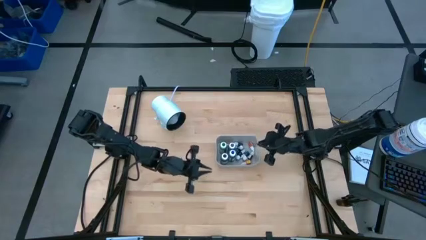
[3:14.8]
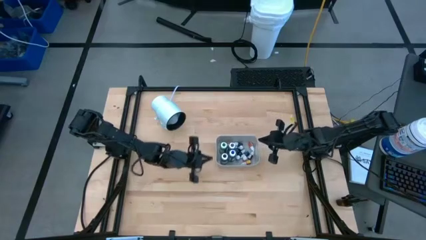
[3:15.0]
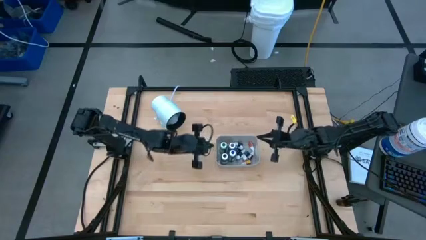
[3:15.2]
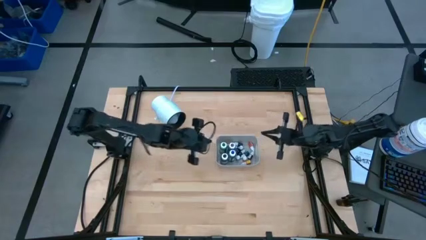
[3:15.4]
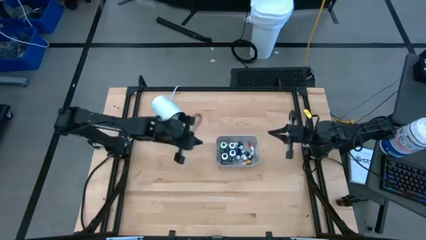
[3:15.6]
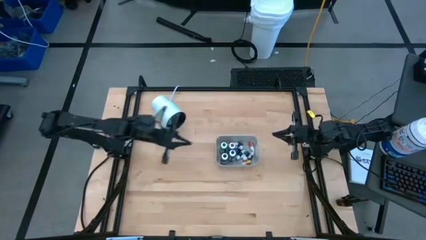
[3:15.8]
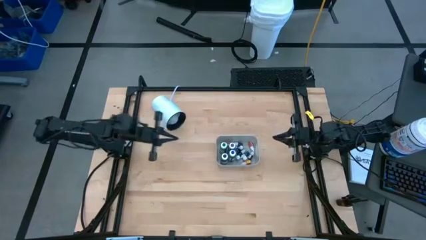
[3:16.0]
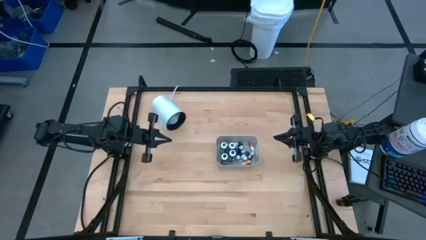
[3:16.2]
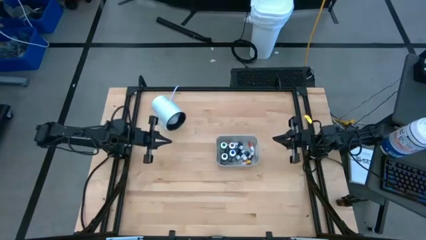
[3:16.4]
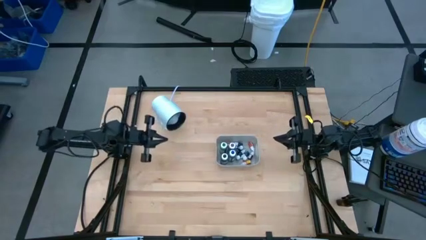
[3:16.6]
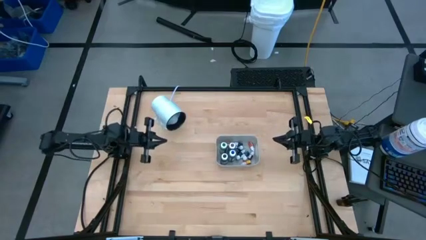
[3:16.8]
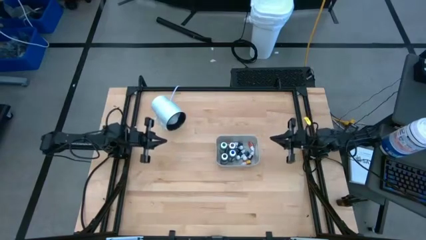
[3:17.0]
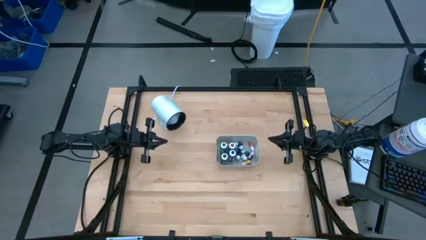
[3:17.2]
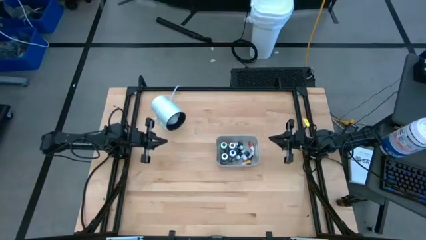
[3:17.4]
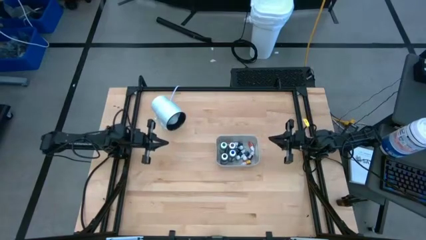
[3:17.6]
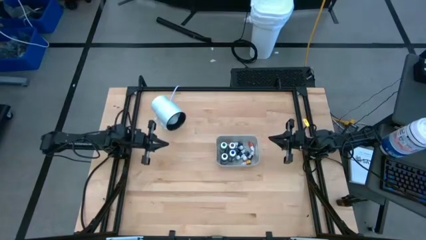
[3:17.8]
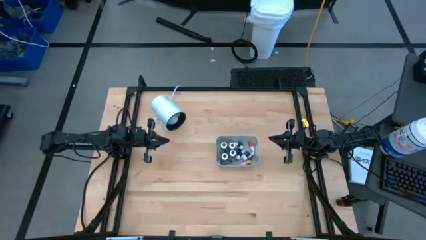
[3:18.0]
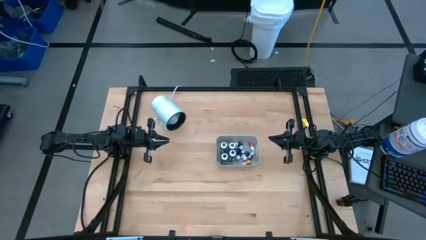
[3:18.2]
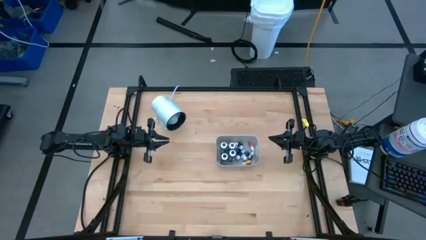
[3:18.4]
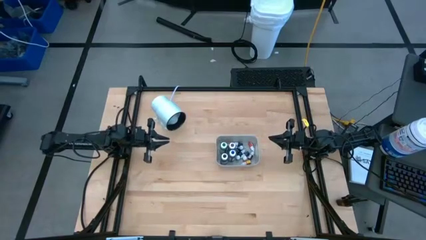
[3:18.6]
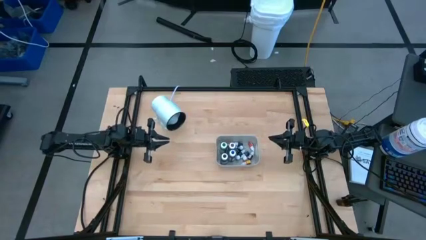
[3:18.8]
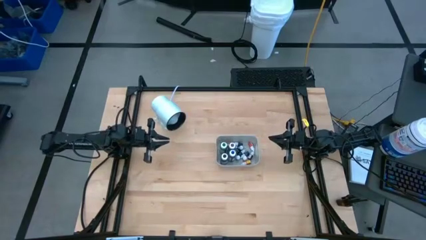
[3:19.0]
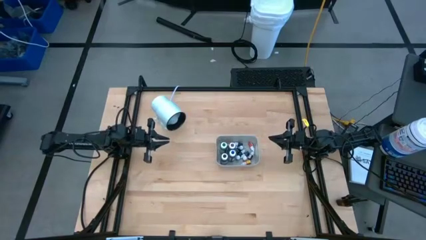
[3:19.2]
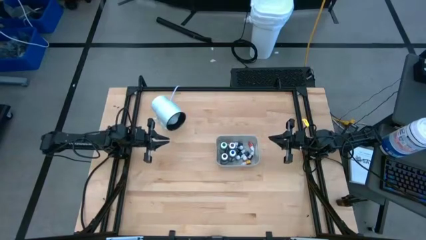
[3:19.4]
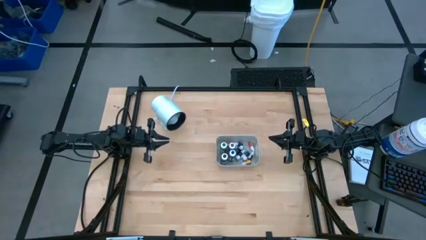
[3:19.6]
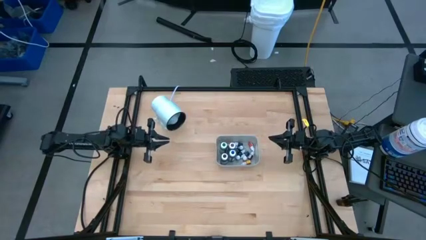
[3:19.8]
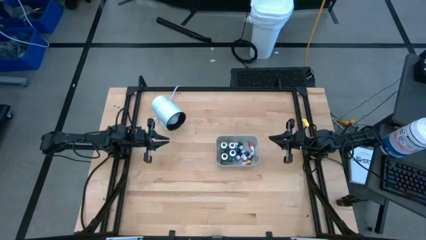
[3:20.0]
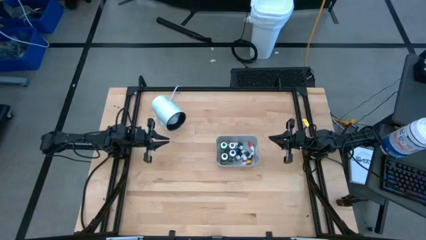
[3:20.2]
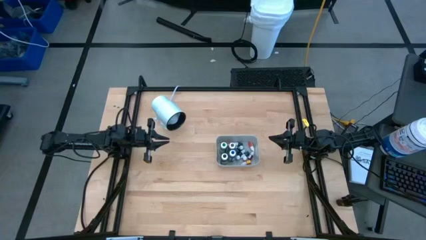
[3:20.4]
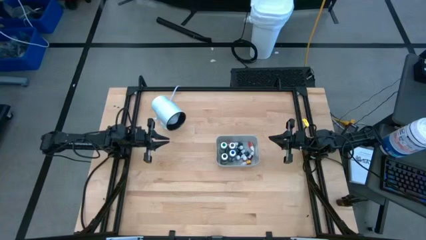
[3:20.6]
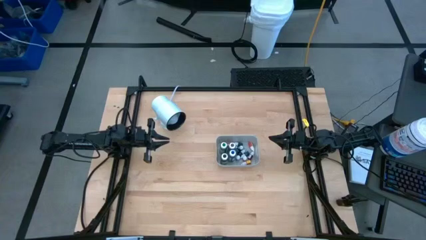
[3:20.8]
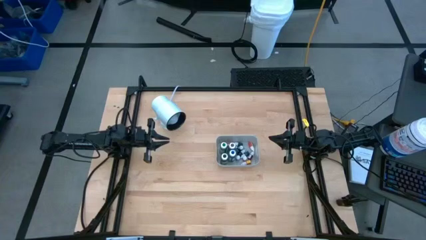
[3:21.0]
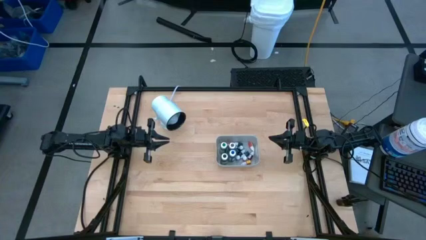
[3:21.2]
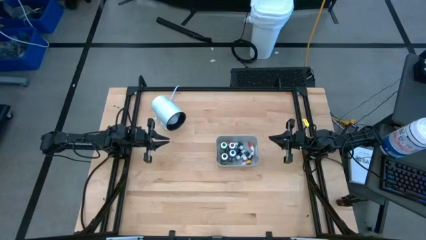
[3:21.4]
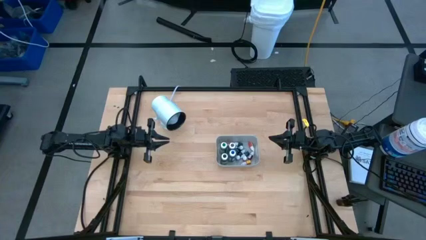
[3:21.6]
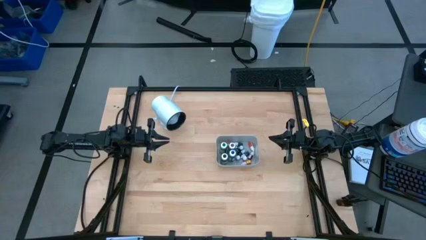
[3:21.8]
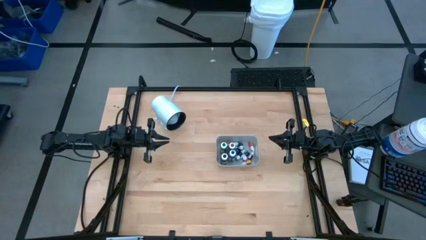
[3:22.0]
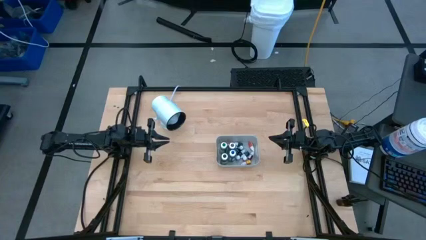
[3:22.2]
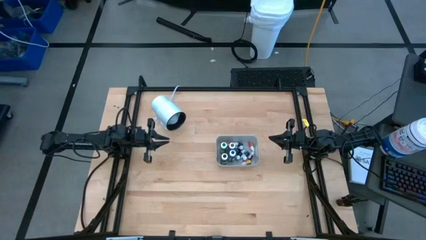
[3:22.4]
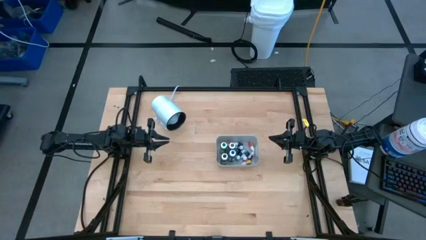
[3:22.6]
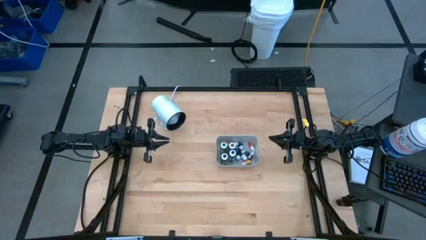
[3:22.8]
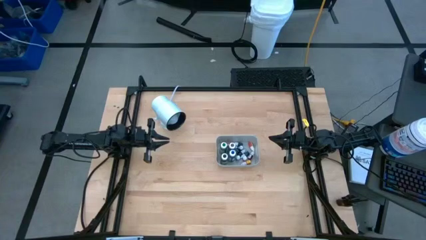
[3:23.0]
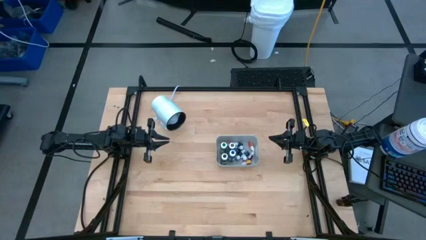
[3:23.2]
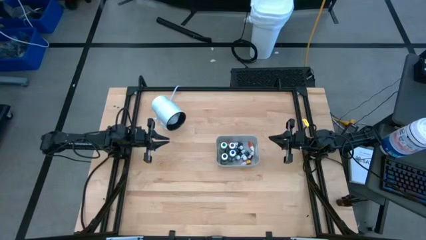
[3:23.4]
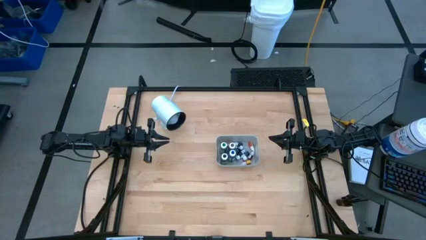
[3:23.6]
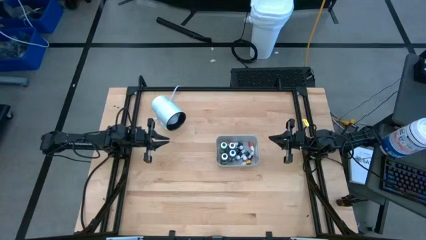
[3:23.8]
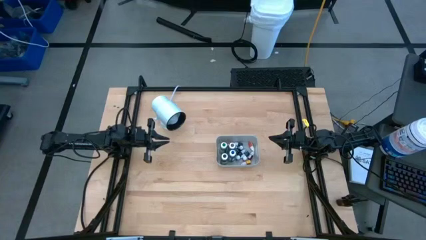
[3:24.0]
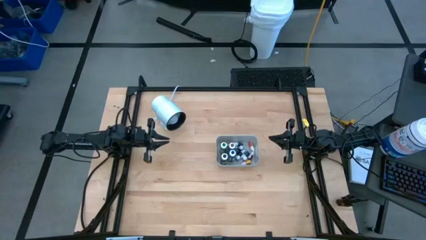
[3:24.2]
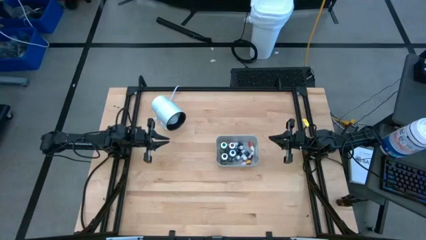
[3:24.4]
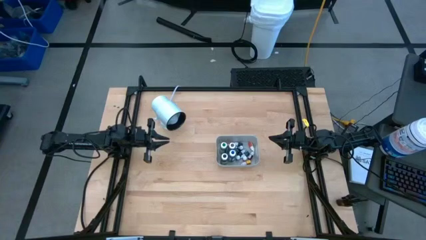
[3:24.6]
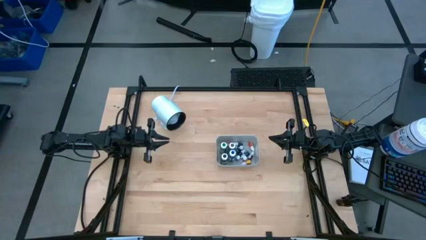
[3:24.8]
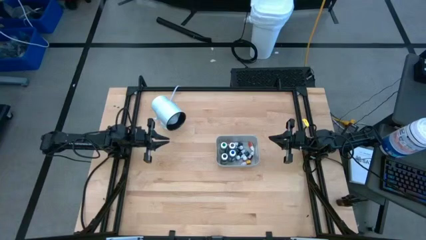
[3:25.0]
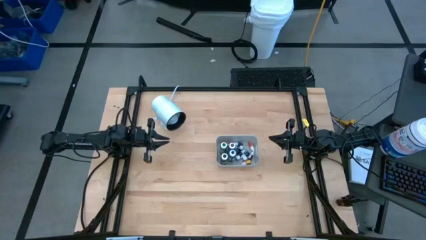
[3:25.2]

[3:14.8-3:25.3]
Task: Pick & Place food coloring
Return to Home Position

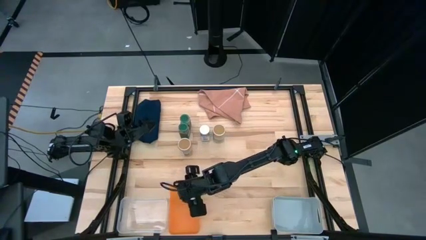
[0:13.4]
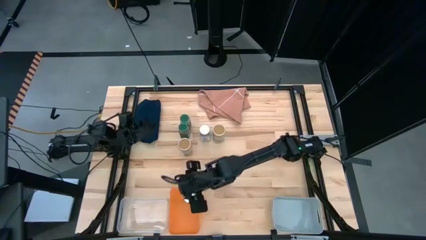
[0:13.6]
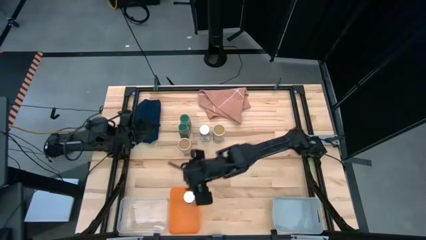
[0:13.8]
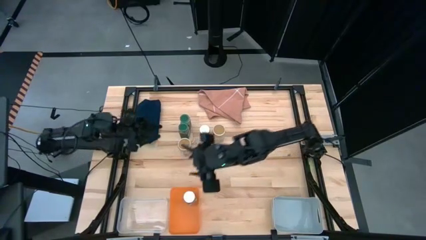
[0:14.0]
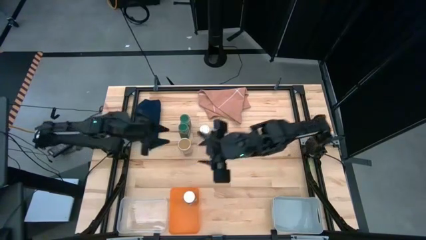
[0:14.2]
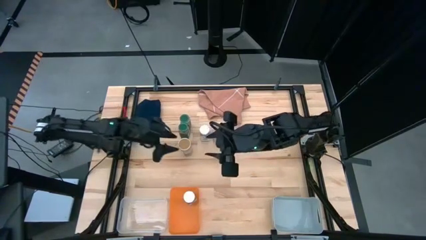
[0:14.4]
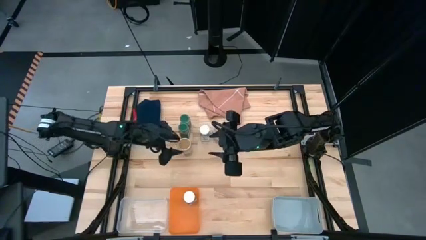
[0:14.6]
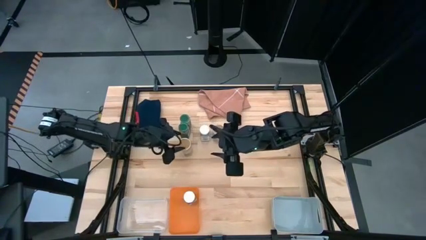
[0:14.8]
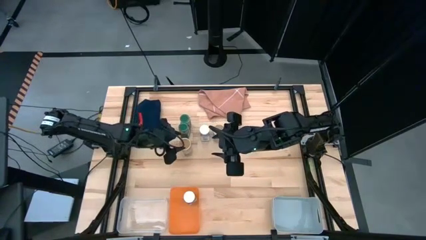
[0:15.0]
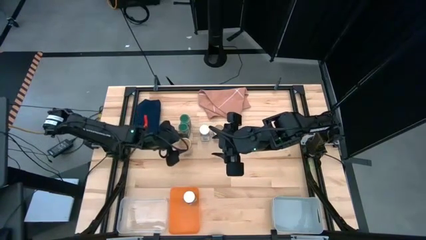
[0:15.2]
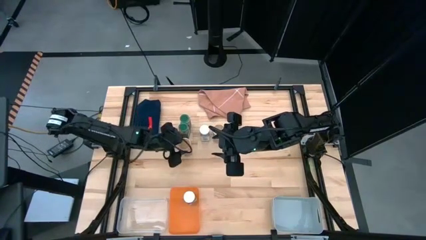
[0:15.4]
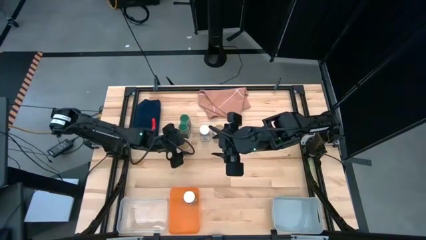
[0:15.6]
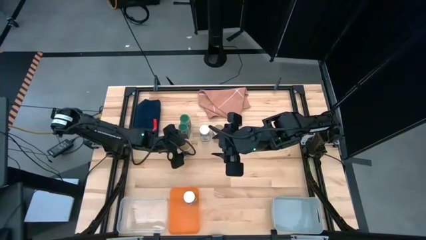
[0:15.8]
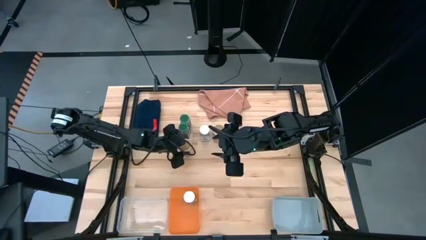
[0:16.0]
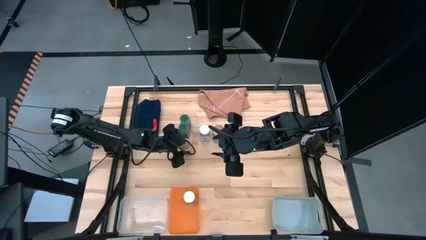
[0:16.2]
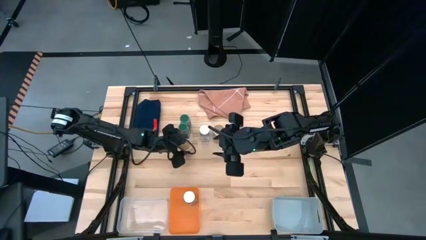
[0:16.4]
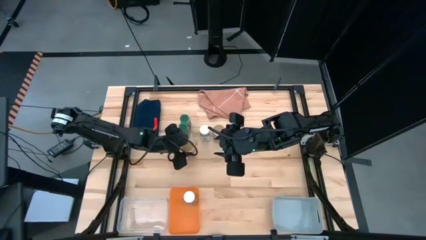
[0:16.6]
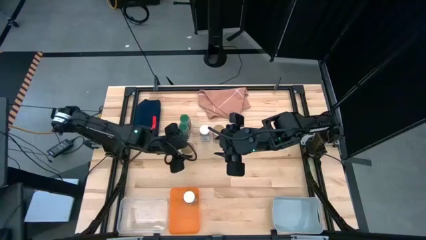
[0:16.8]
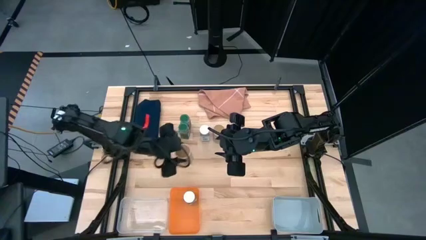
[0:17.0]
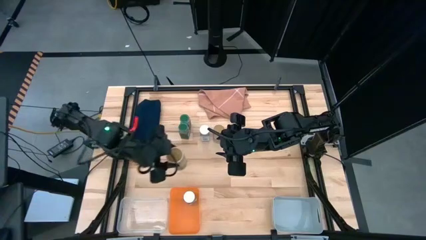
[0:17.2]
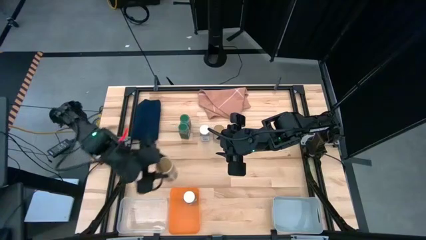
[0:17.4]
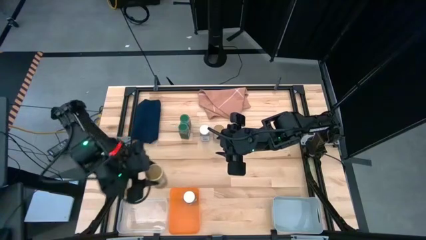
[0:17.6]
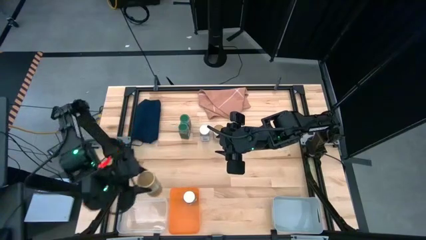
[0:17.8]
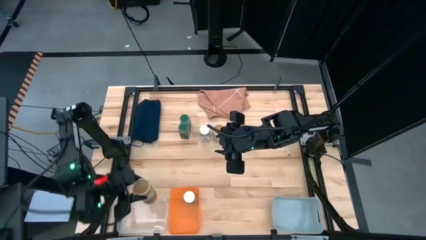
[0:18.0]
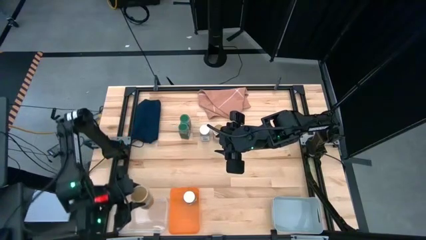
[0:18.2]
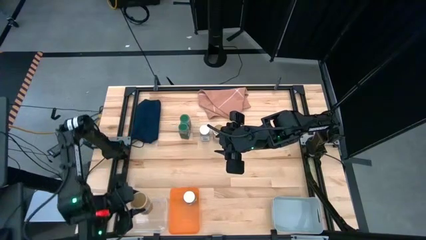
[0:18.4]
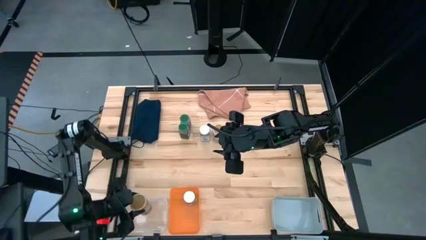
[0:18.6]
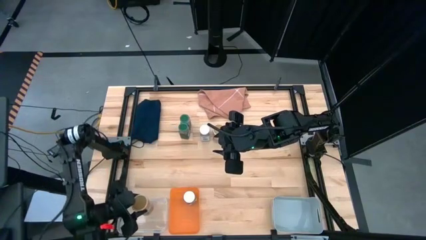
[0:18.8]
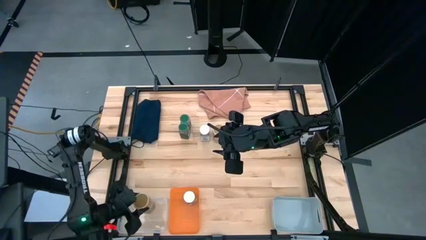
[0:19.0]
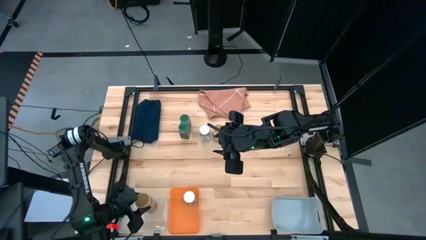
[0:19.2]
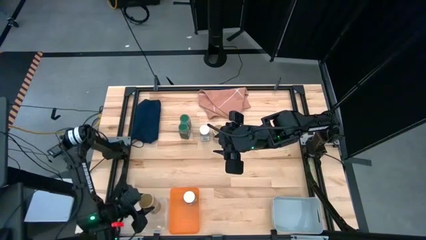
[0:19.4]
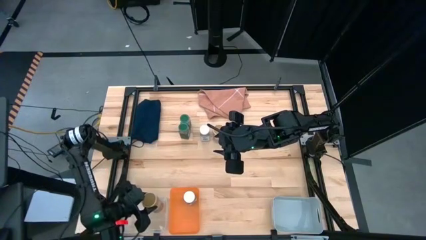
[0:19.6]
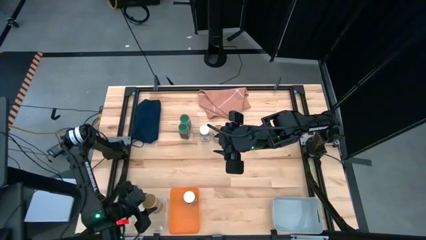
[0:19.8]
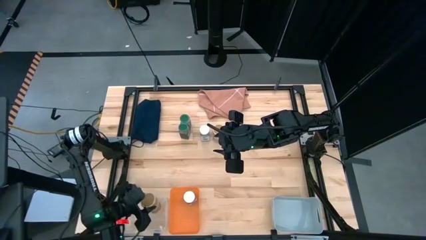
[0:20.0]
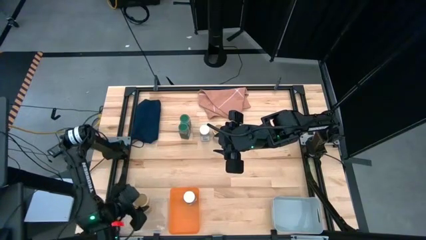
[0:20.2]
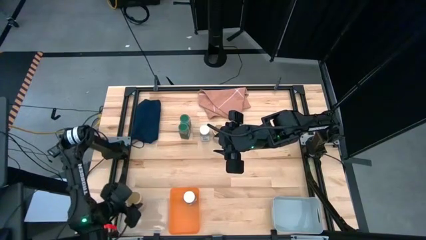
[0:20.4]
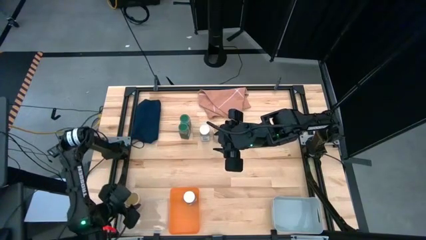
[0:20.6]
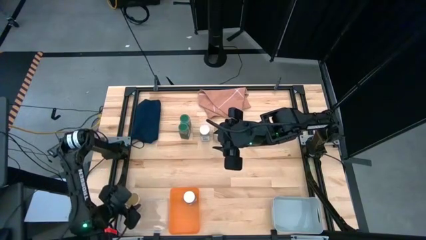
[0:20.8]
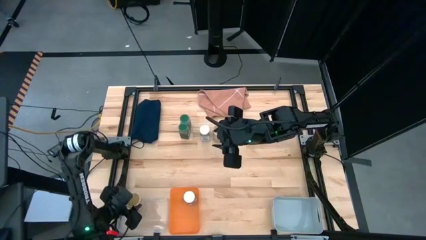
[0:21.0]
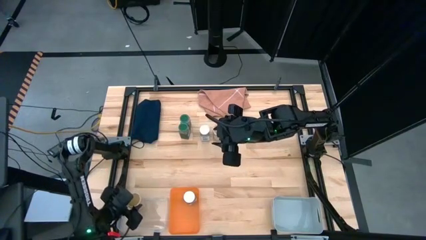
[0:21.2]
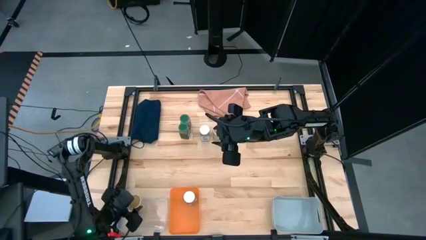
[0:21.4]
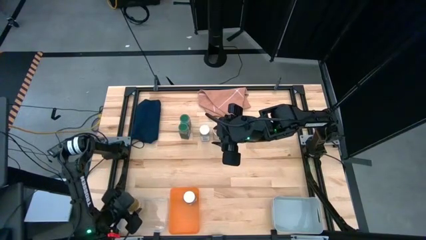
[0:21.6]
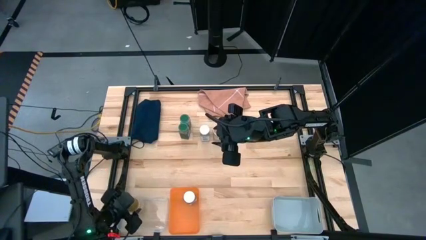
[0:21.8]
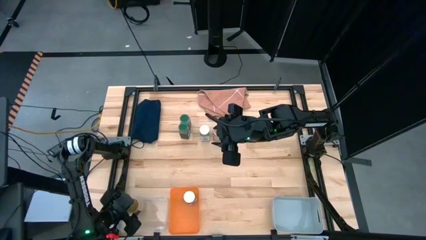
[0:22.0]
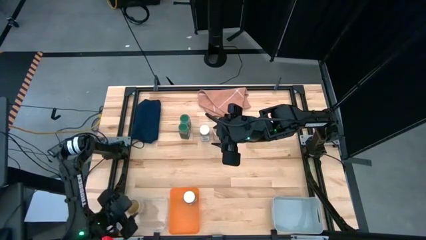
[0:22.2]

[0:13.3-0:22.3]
Task: Sort spices by type
Put the left gold seasoning bottle into the transparent bin
